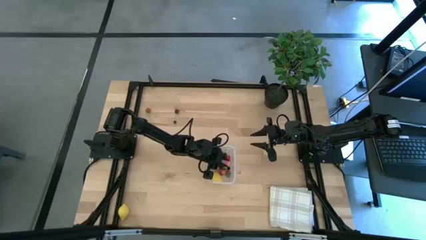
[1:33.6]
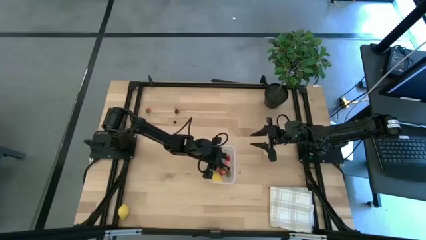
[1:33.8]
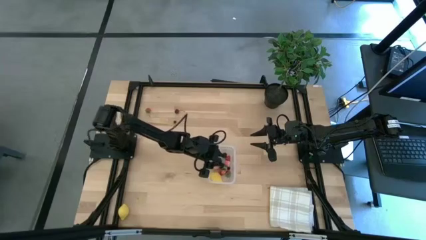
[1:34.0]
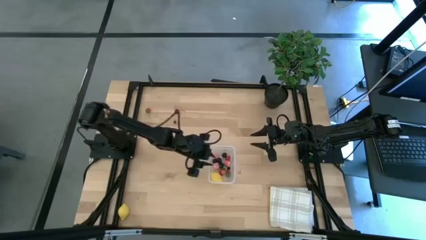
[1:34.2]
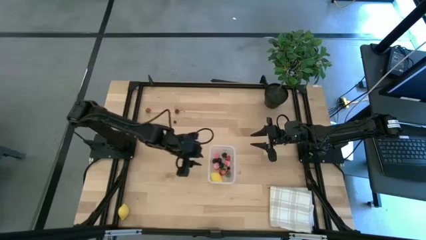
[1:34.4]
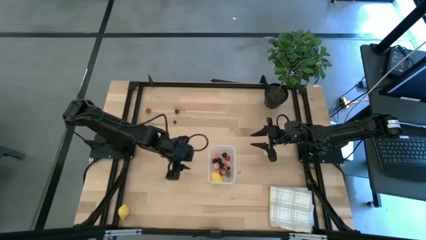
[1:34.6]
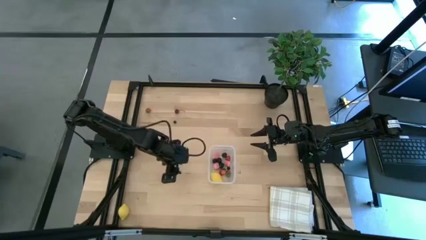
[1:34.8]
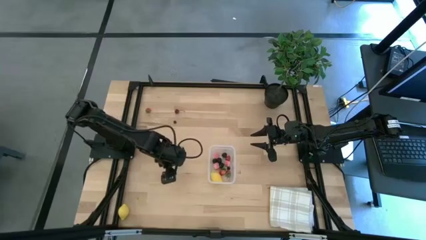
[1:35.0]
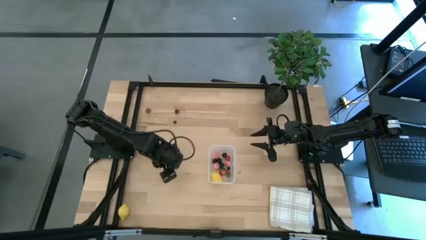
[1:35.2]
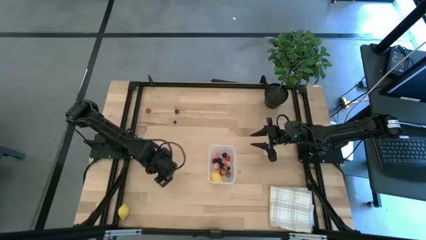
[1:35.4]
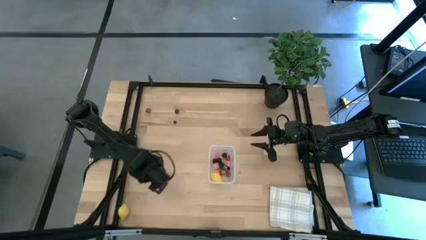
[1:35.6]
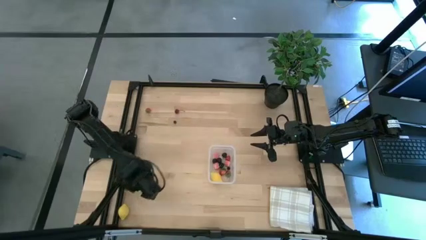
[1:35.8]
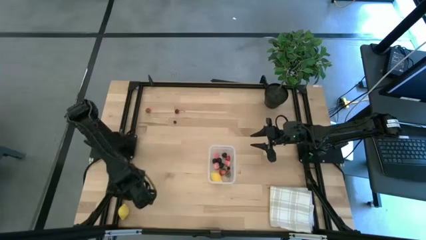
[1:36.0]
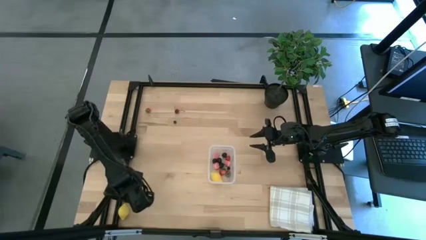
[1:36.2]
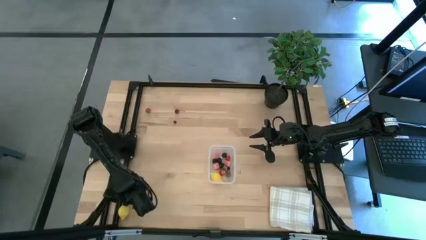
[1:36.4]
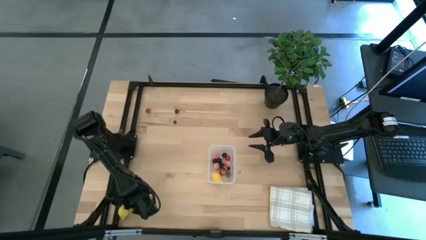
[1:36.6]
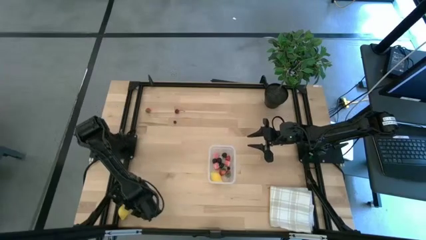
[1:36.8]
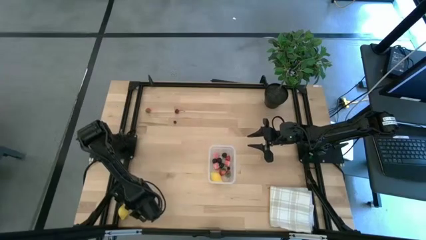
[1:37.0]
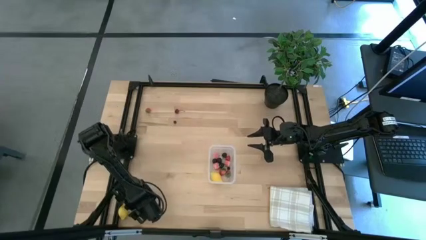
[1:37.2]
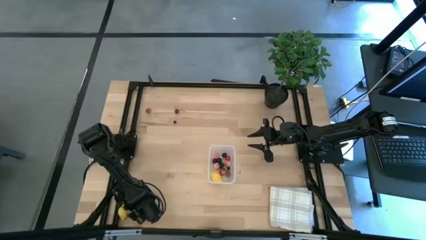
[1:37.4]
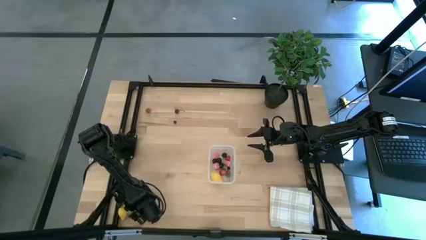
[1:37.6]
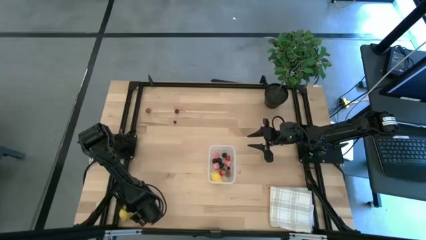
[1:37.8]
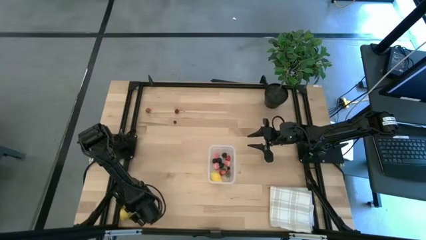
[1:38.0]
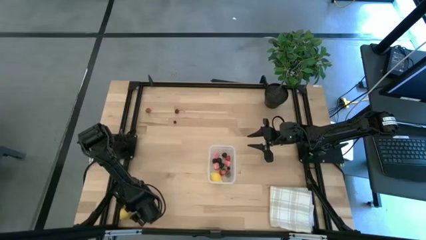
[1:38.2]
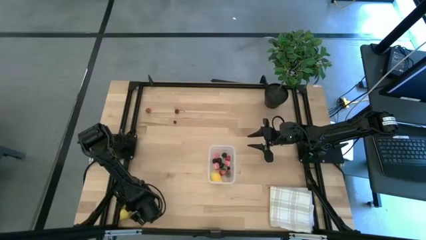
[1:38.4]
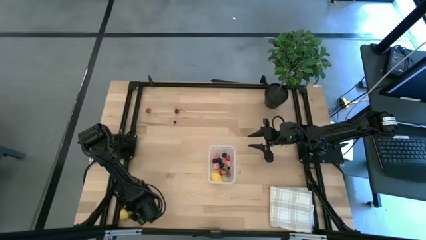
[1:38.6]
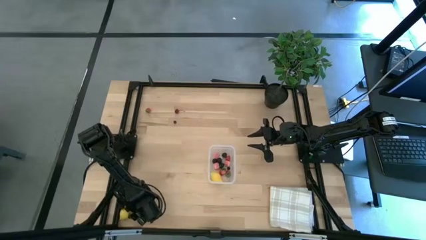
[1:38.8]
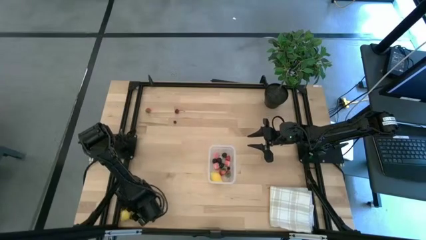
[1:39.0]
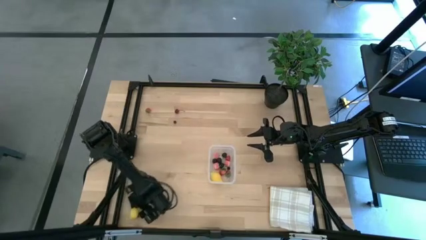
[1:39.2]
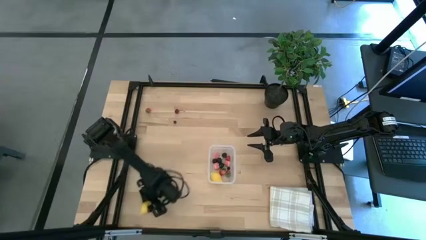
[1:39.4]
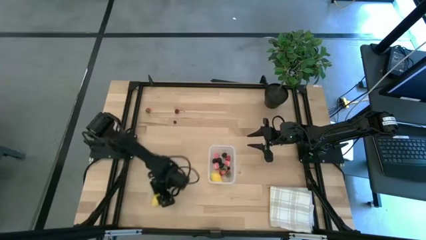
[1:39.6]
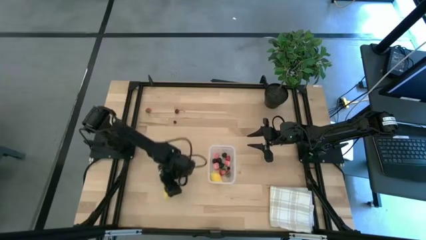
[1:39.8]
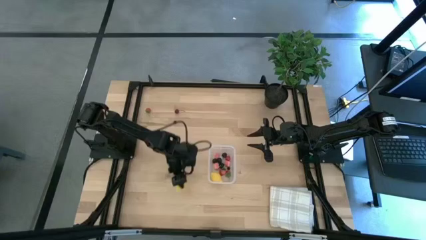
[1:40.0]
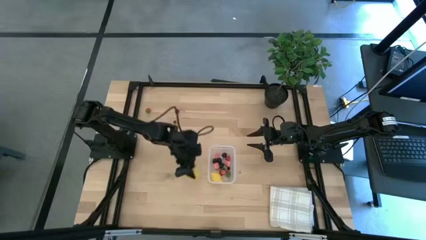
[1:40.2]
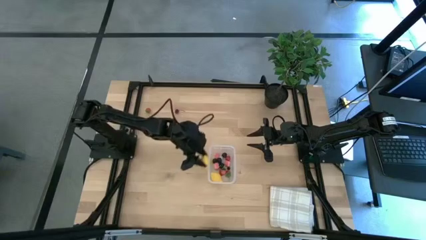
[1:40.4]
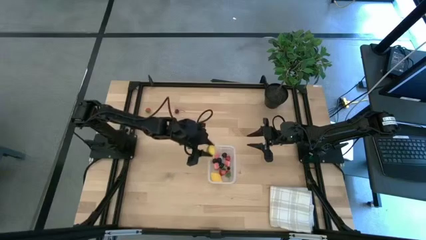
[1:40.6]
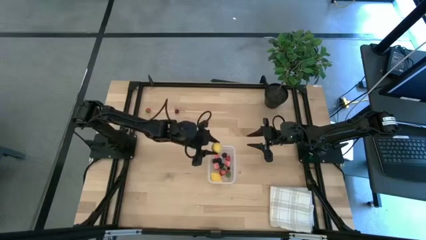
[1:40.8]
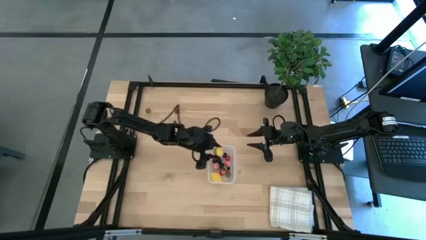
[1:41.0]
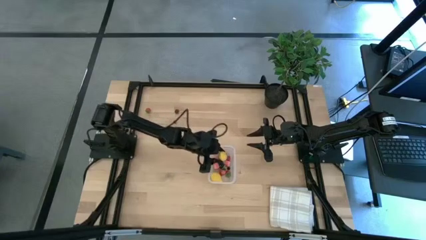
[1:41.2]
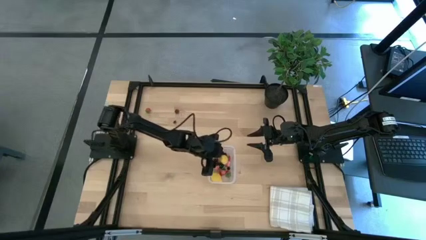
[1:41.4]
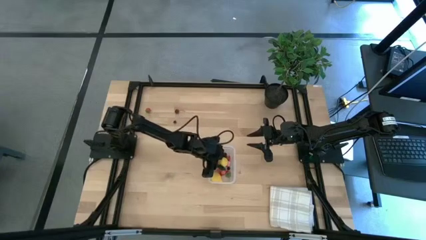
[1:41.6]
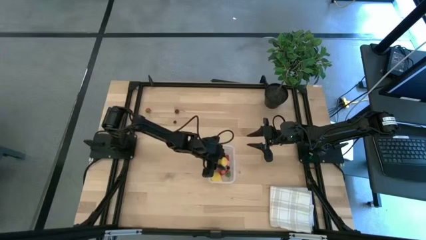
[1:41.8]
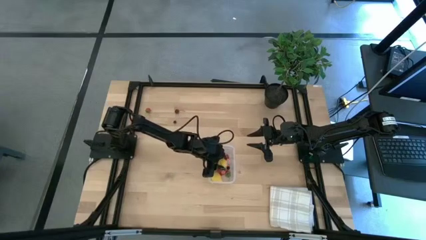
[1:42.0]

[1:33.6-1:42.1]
Task: Pick and placing Produce into tupperware
Put the lemon into the transparent bin

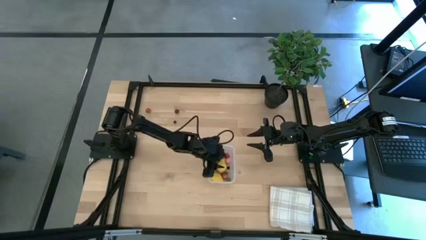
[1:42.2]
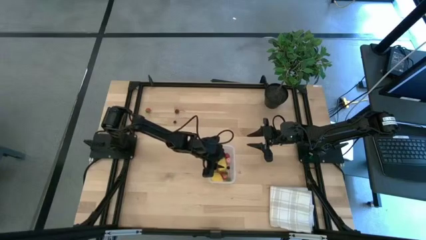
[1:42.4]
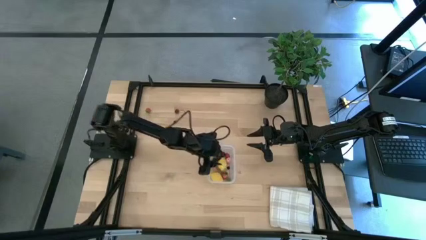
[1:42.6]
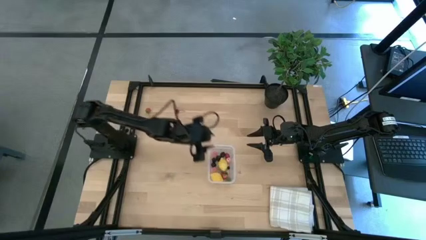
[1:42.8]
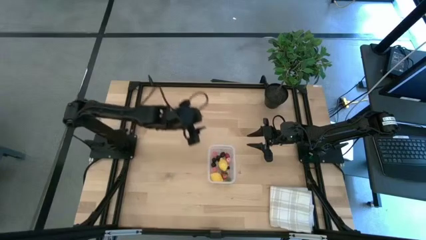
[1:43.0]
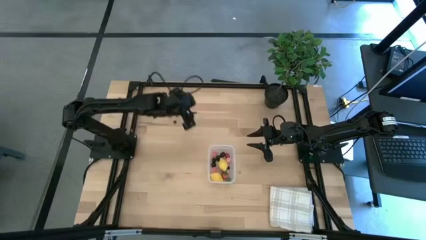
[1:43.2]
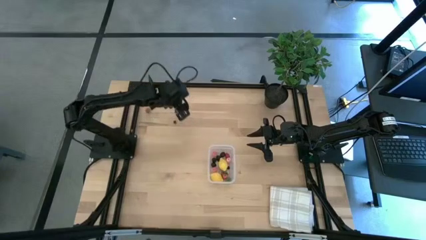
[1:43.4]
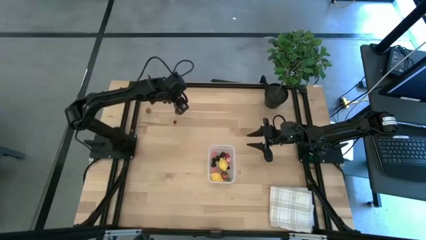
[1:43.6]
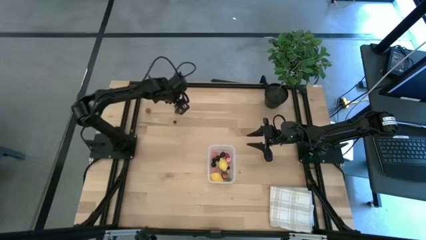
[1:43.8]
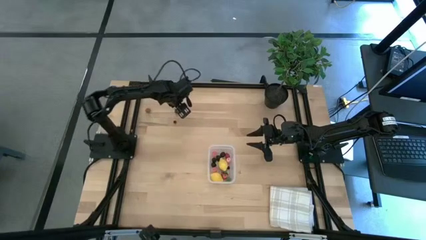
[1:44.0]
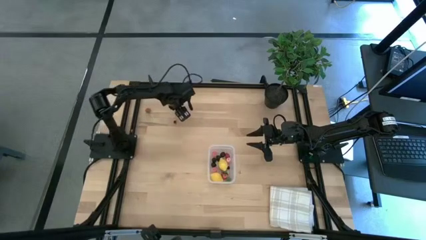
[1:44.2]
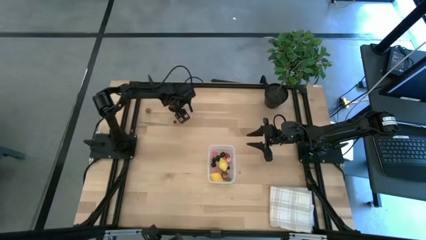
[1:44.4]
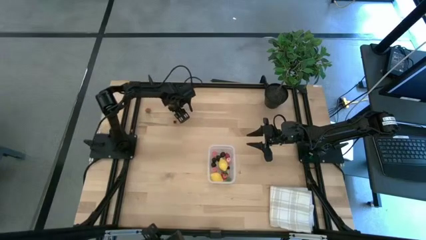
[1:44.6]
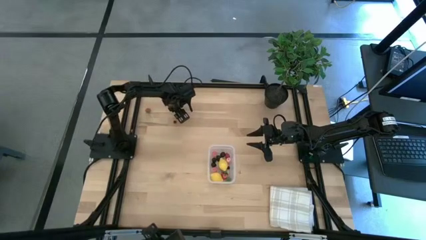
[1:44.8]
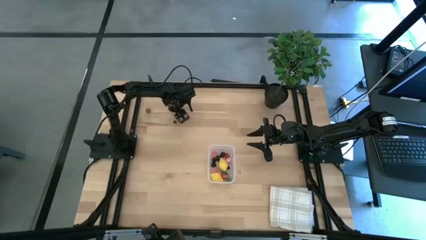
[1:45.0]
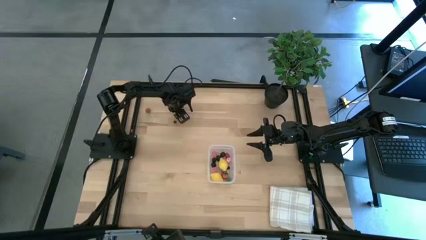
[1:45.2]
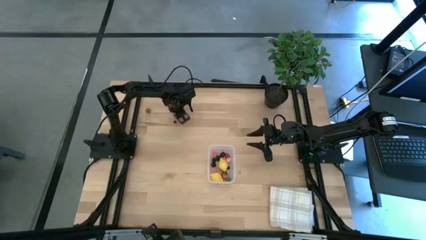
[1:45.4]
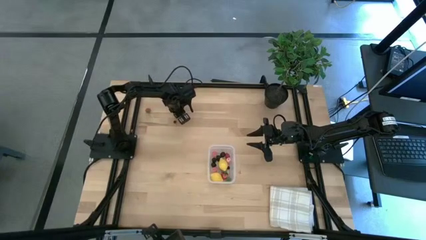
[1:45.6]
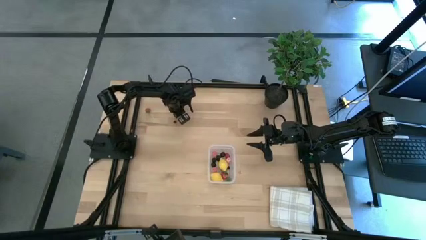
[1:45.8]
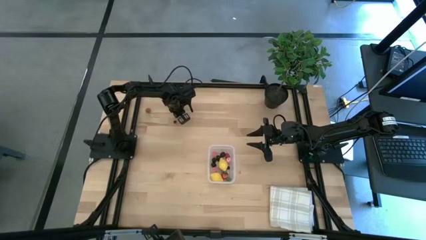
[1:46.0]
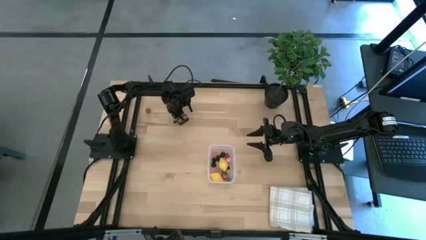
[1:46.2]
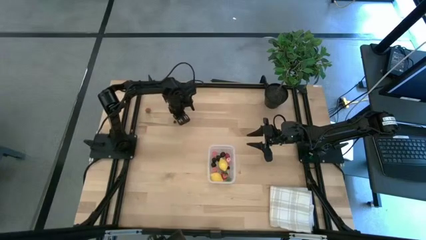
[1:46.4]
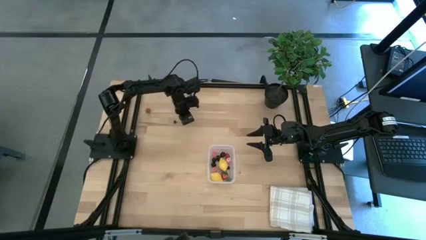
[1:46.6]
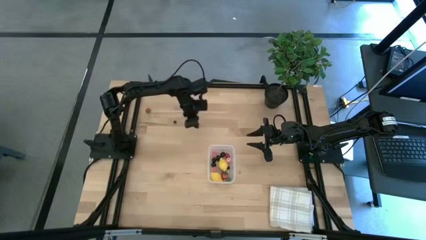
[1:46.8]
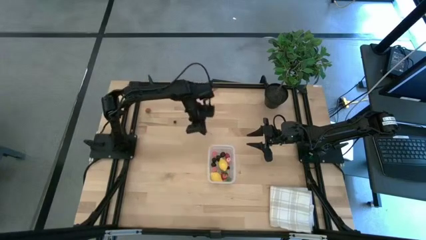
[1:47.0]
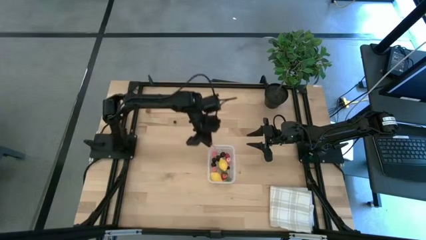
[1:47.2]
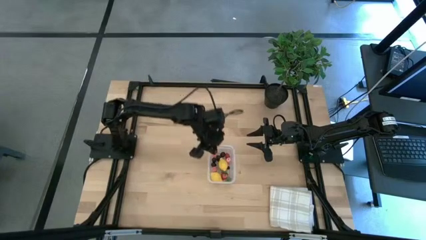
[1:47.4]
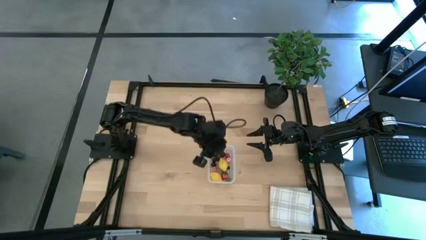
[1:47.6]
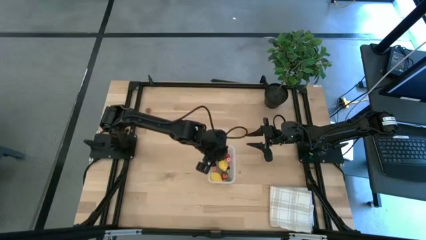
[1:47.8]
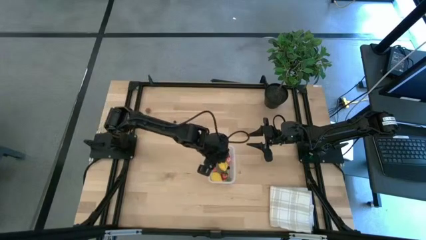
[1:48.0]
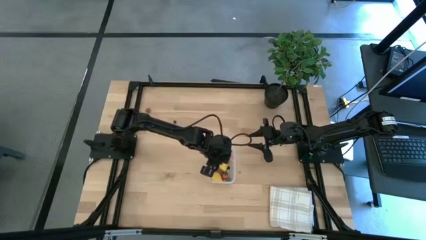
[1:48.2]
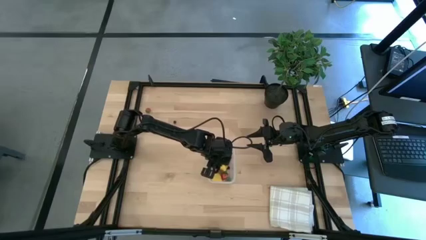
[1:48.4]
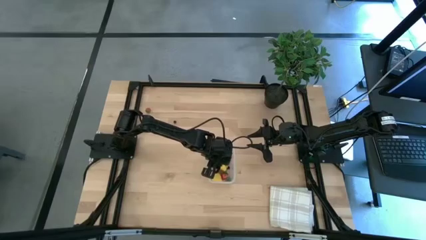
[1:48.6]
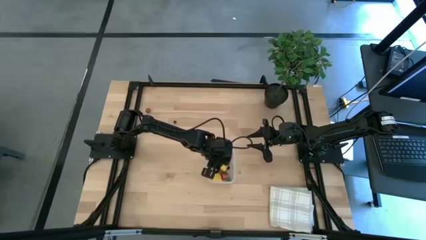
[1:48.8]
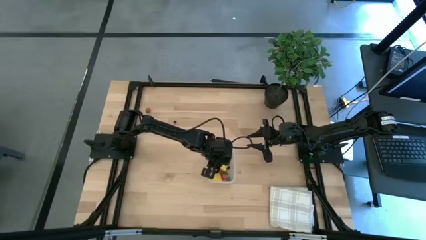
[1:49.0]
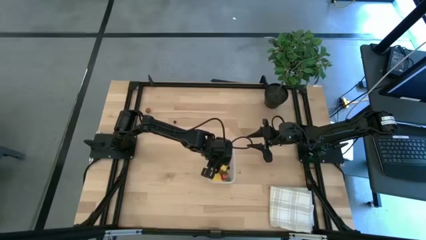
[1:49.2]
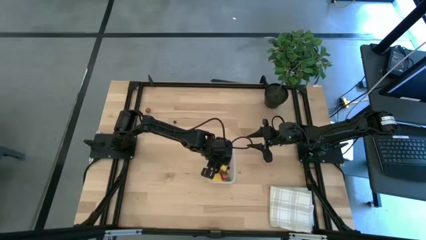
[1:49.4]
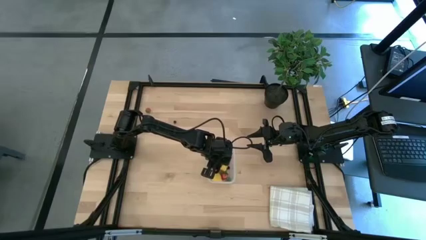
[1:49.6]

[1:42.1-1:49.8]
Put the cherry into the transparent bin
